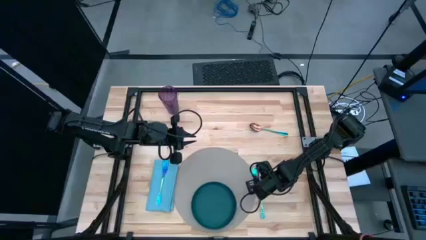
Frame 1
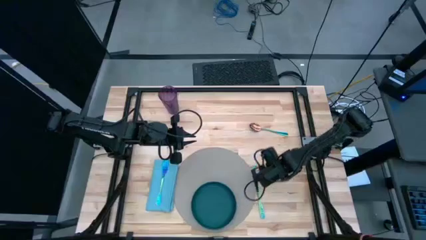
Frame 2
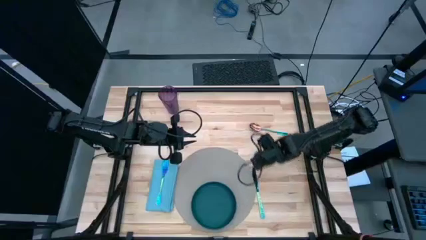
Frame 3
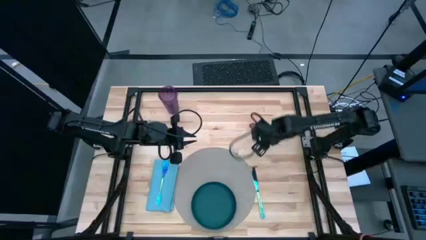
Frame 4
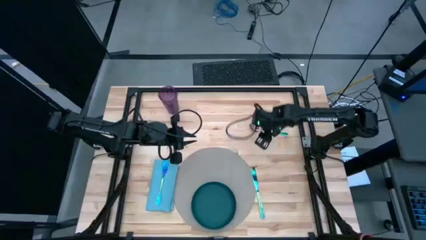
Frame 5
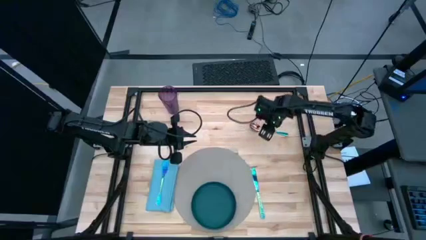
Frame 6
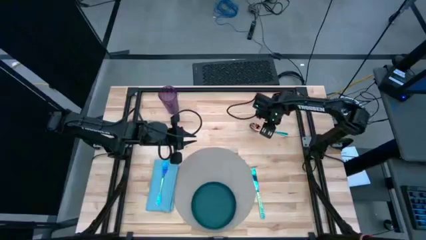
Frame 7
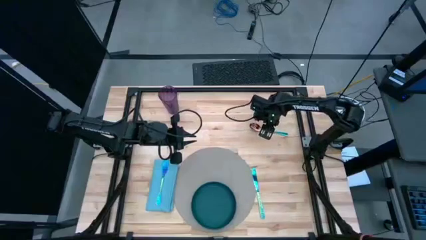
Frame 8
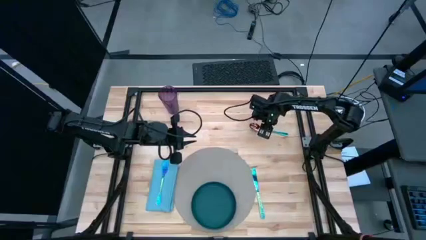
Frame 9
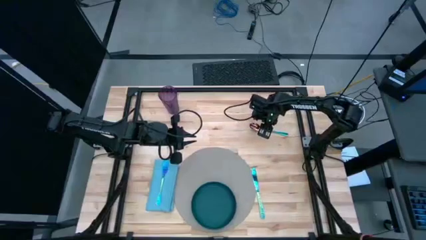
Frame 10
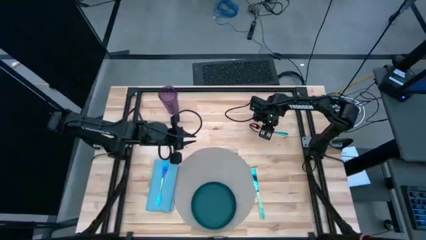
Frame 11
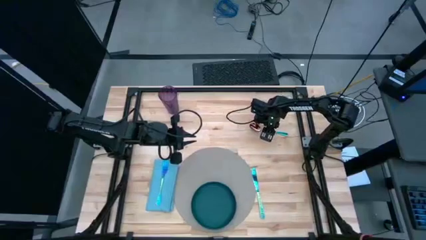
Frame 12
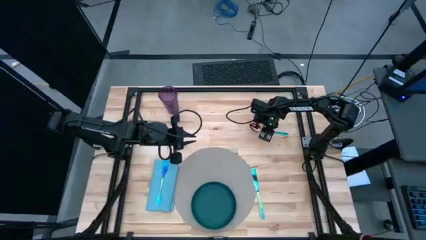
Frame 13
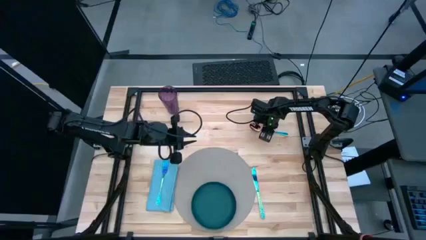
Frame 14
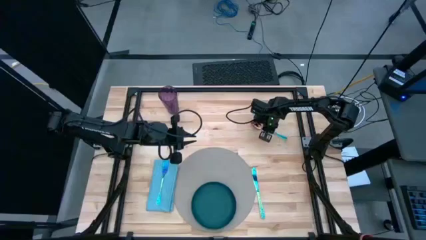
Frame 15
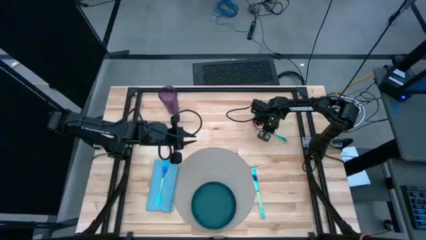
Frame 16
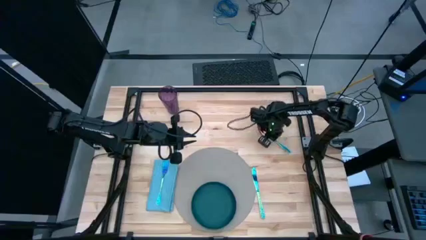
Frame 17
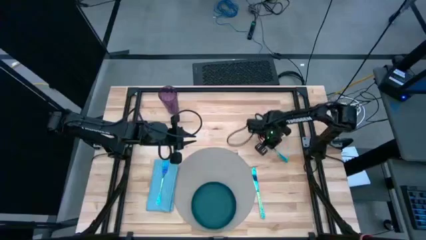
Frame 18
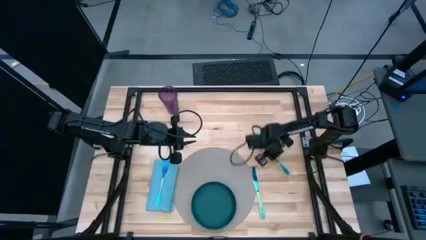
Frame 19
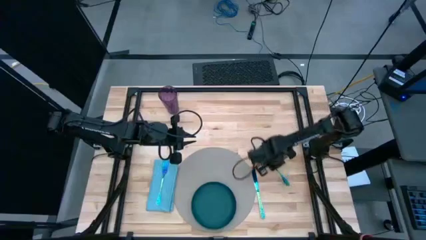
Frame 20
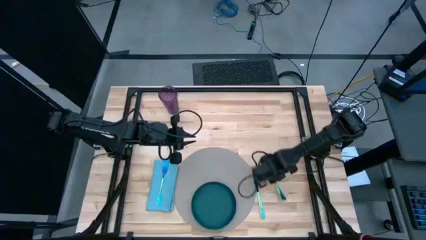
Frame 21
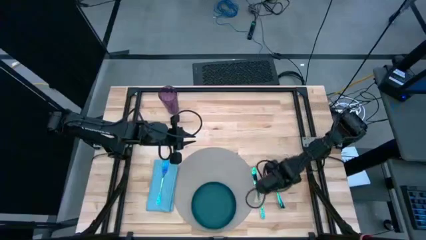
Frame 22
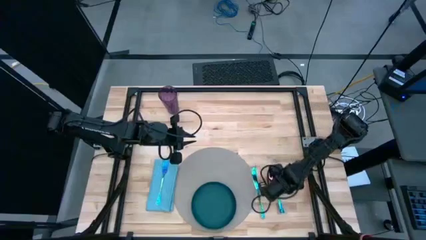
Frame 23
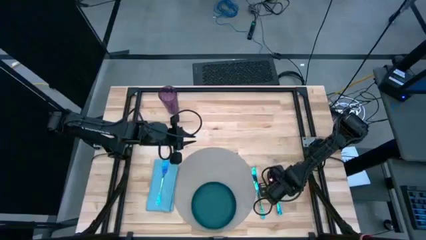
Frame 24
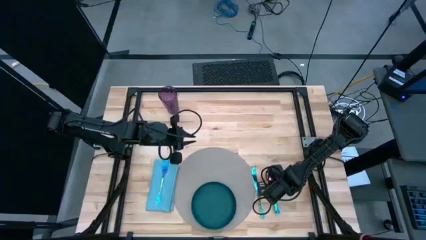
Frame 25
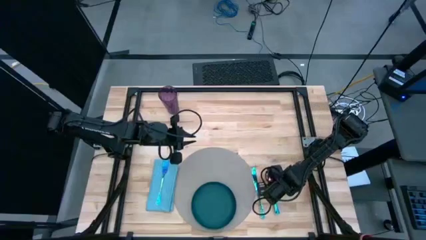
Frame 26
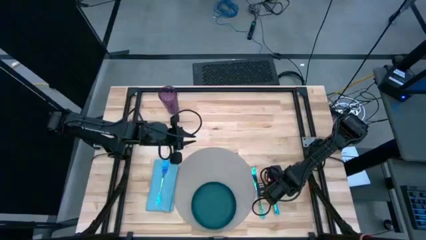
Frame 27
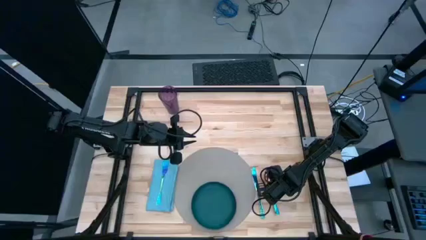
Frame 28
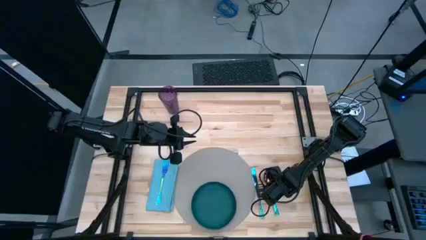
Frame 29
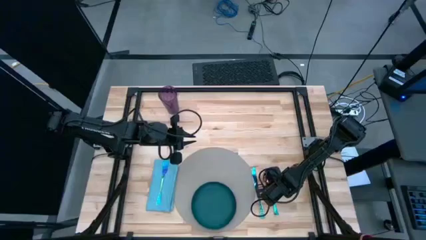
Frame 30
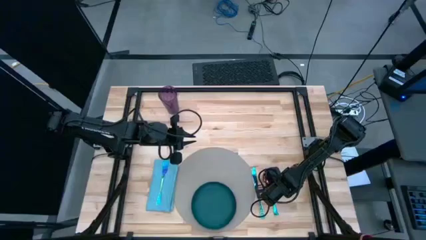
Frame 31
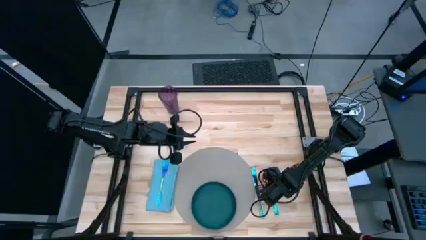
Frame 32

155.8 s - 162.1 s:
Task: Set table place
Move the blue spoon to the right of the blue table knife

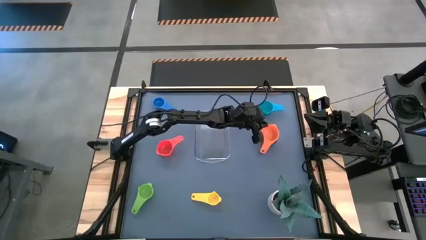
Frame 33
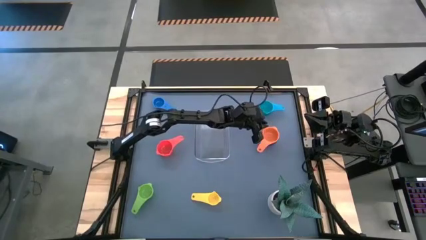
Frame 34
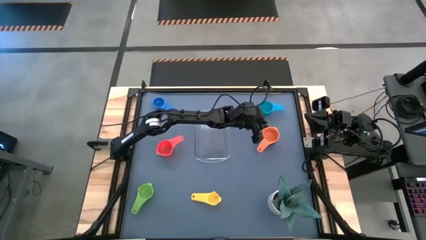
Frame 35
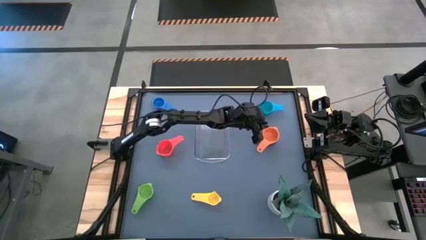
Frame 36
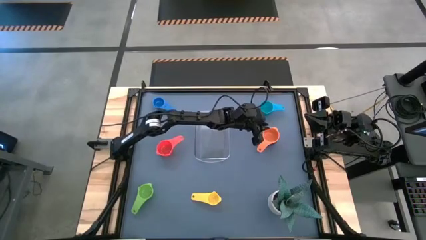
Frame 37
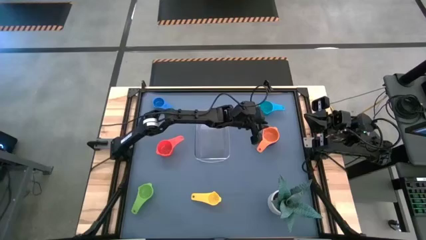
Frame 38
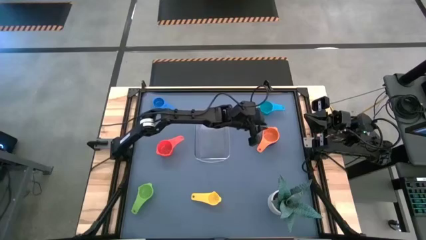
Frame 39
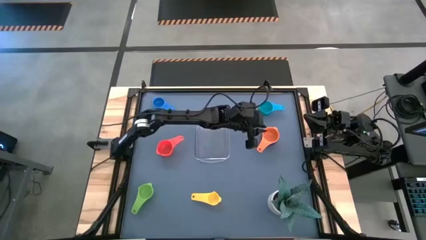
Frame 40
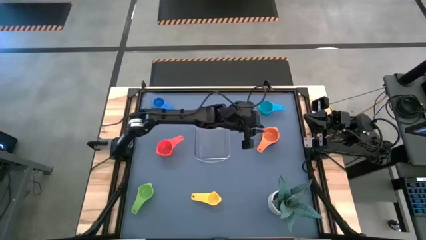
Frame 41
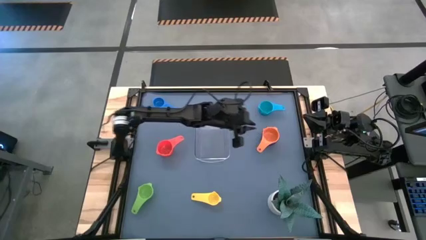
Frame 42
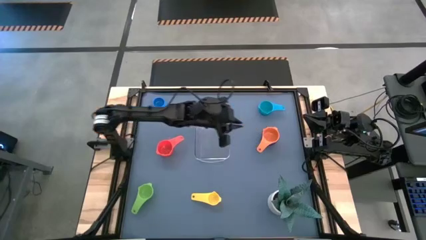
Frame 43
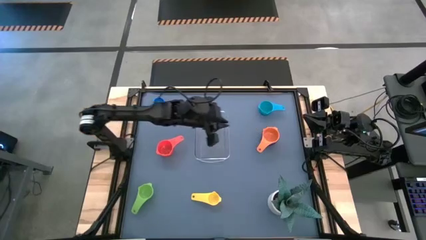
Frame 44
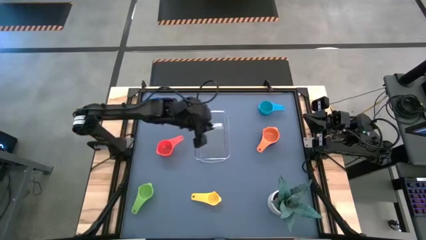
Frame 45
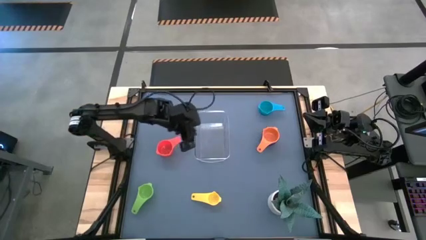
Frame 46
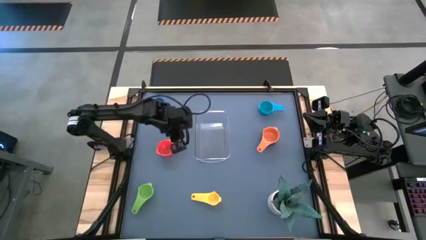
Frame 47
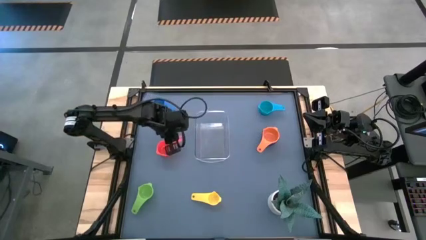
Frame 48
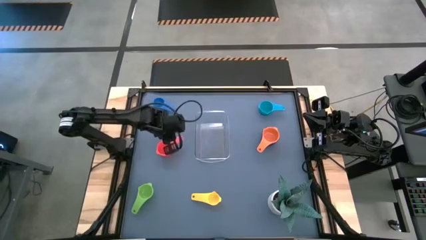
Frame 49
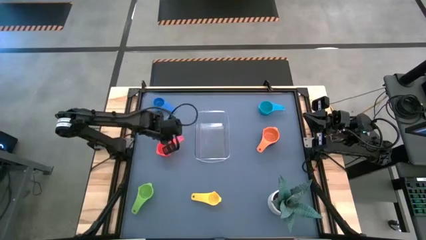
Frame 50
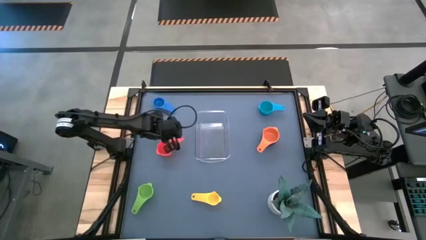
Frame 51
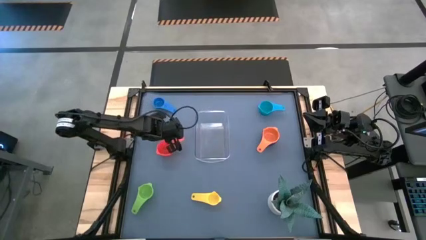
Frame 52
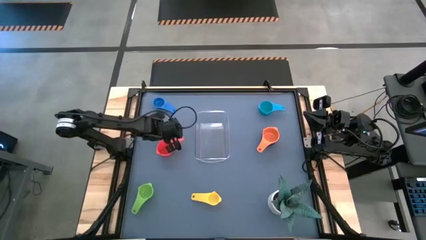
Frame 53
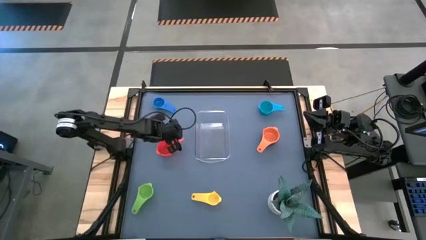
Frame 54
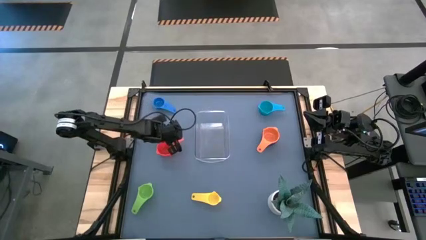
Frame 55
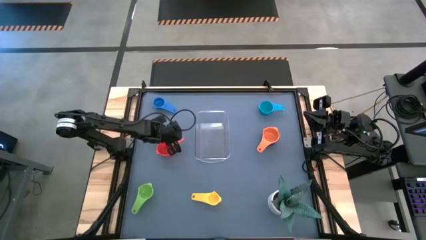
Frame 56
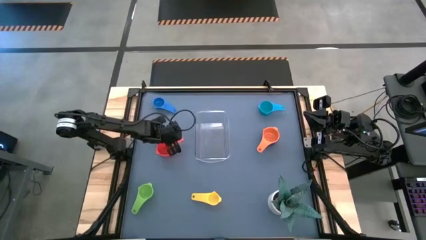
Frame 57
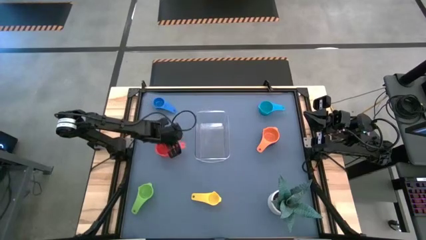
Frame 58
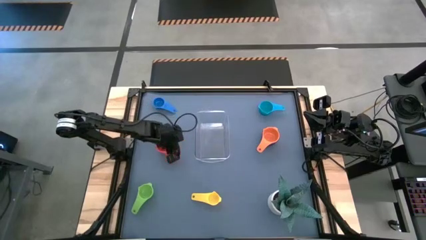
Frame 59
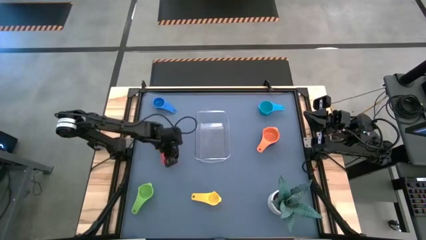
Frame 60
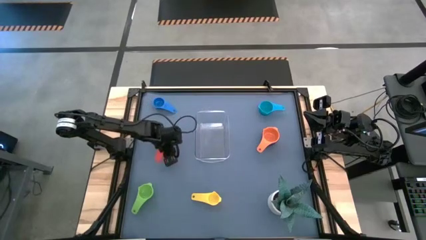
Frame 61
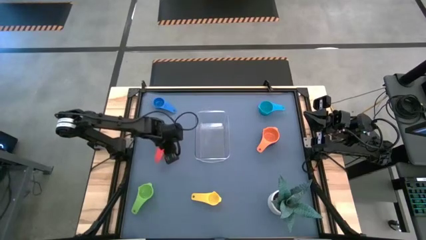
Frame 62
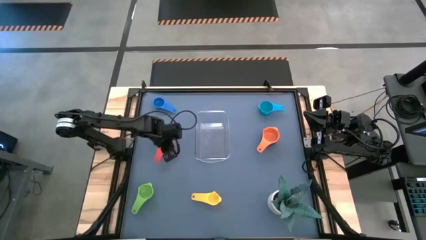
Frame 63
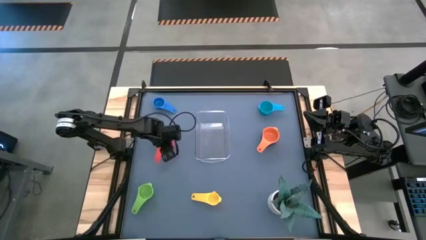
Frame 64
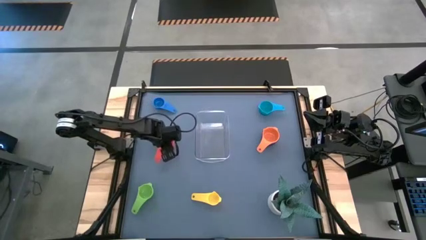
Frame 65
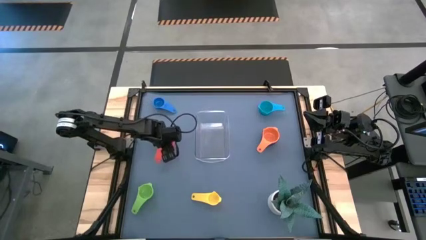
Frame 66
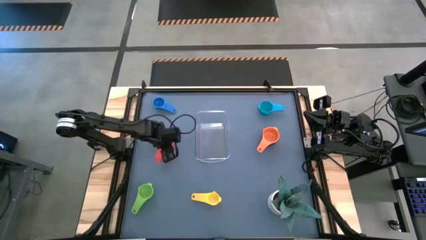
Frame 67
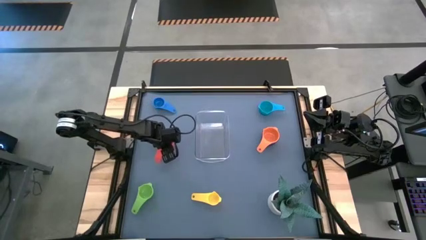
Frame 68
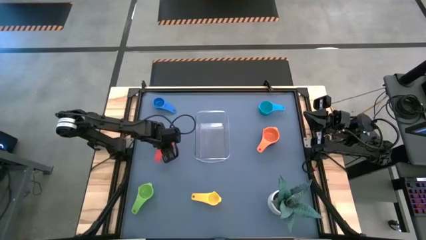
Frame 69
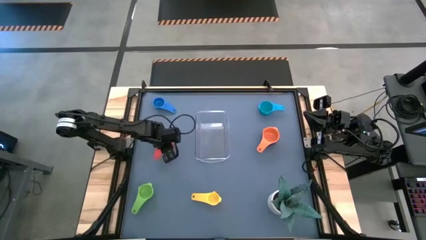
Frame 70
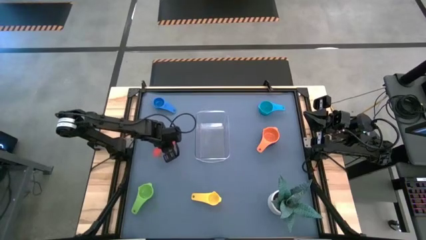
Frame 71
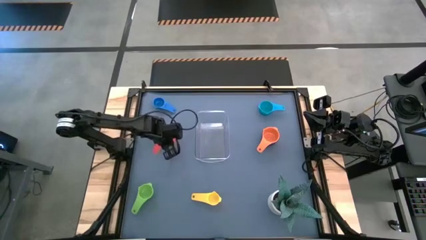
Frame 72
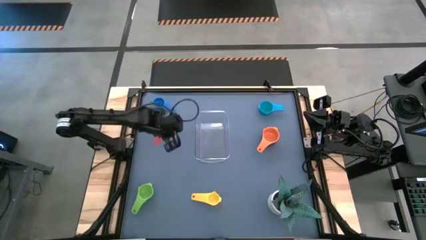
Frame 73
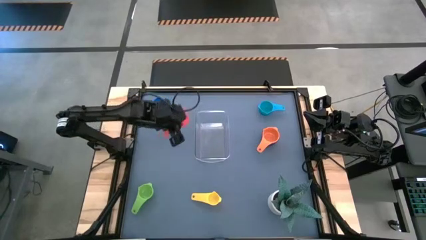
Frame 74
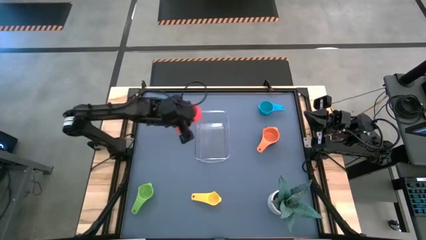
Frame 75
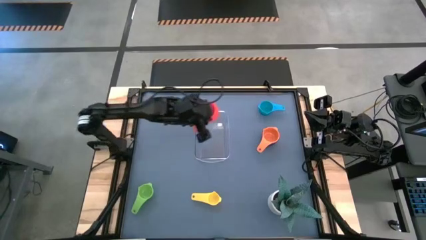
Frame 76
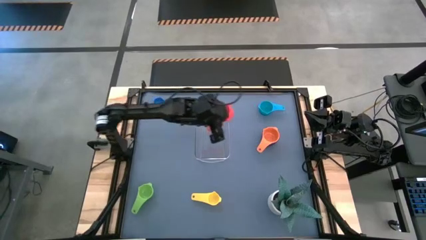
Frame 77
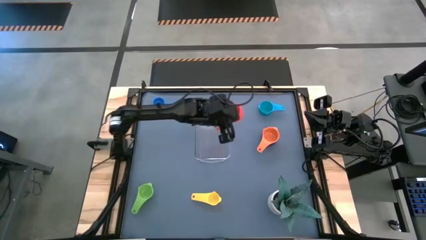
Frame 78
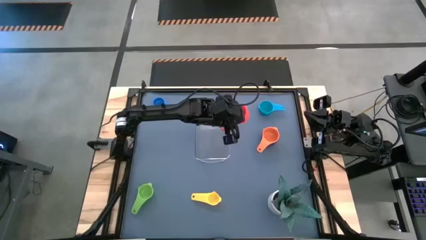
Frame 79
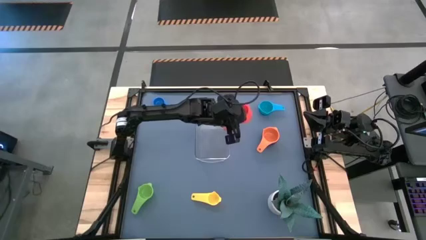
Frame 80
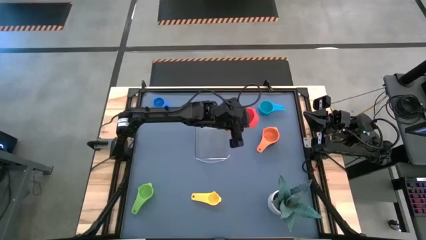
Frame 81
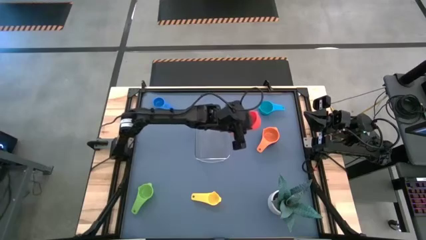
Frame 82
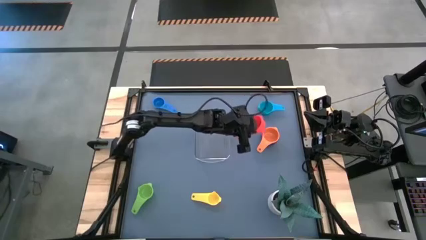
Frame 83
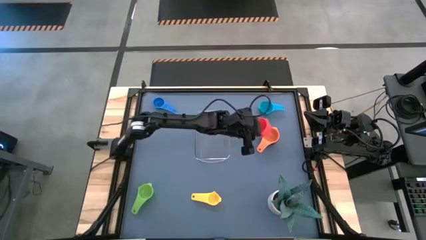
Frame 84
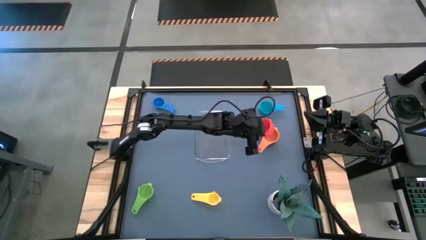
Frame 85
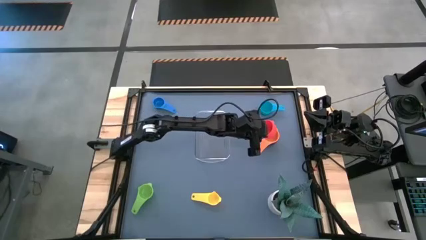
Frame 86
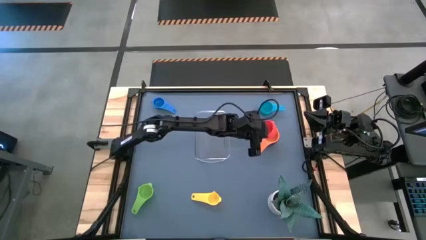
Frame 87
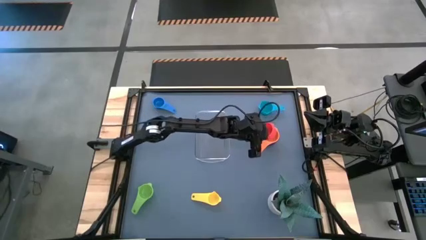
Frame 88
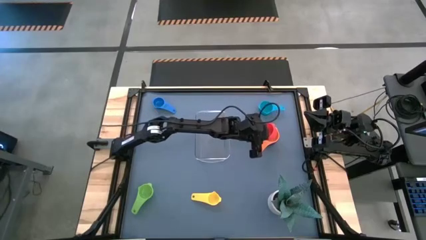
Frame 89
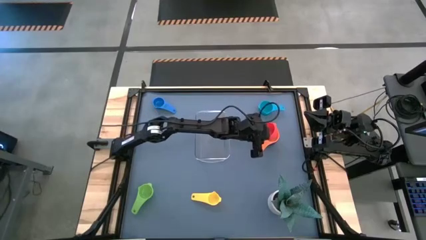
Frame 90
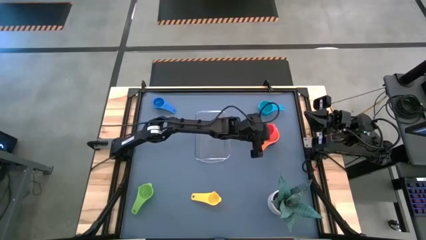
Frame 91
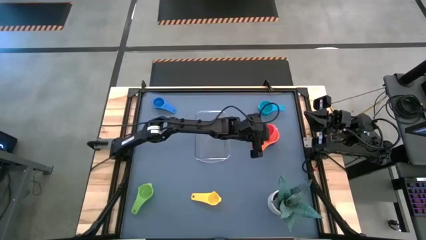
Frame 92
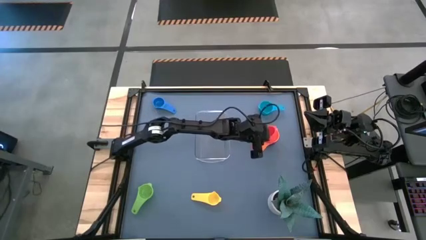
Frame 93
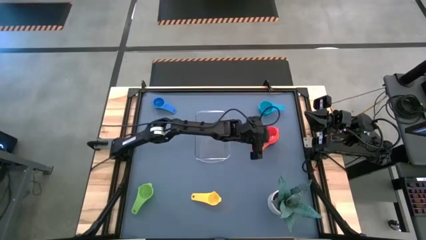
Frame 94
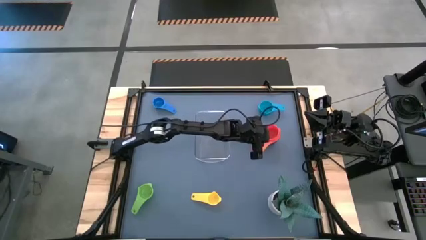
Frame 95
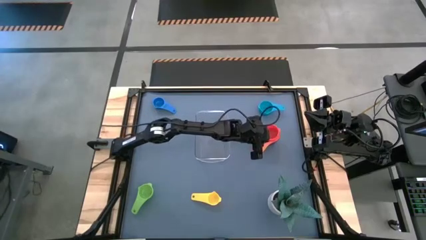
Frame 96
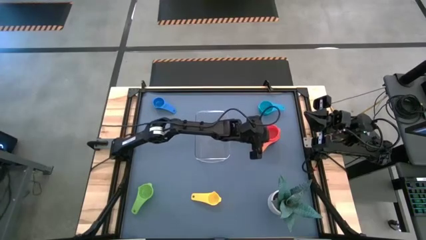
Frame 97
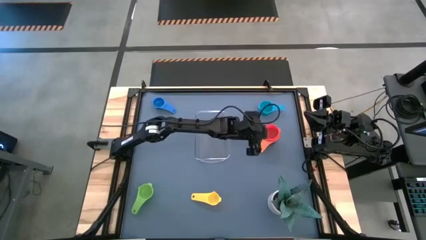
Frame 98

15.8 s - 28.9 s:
Task: Nest measuring cups in basket
Stack the red measuring cup on top of the orange measuring cup
